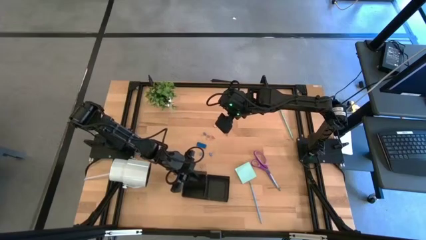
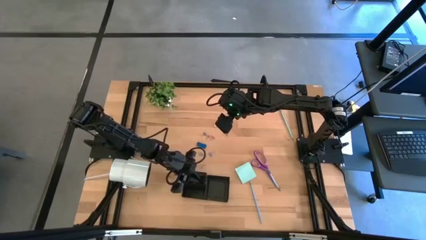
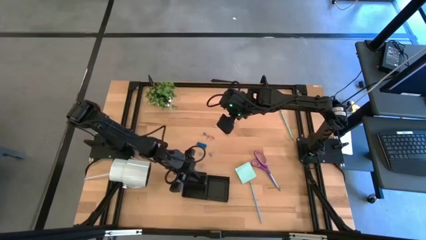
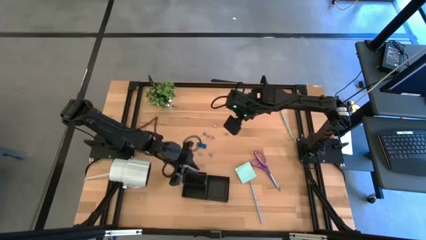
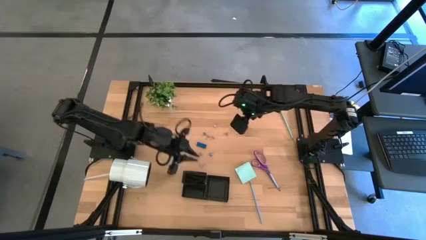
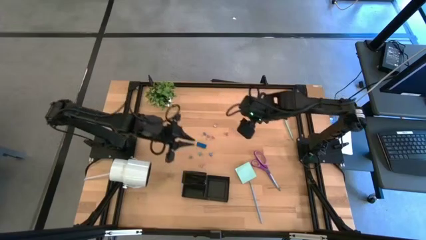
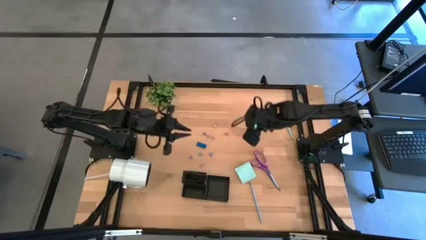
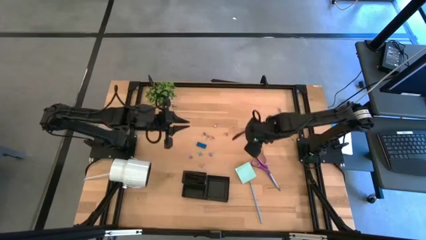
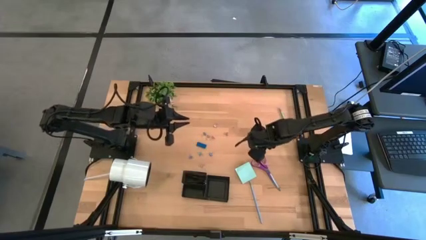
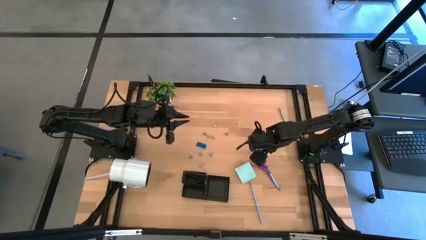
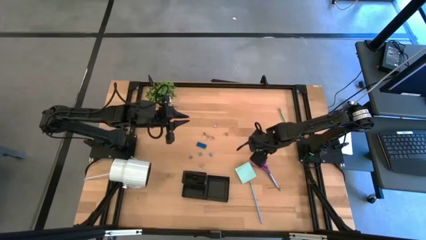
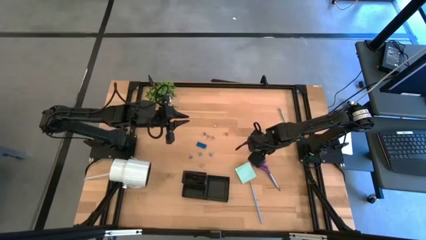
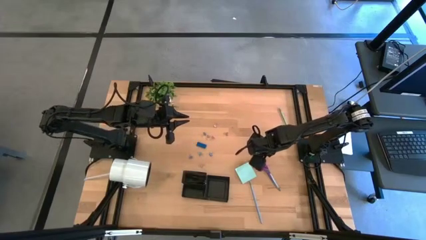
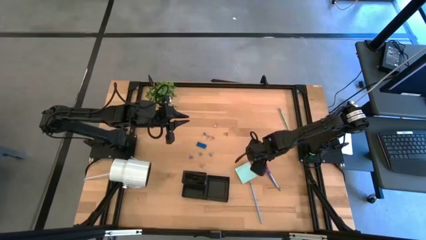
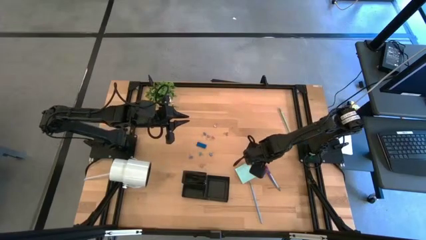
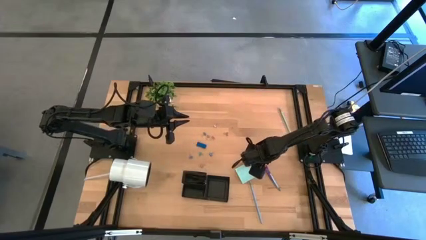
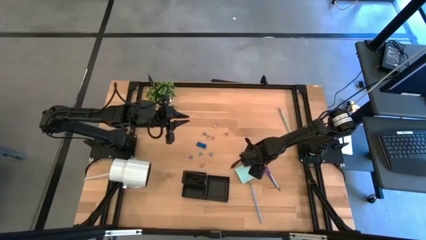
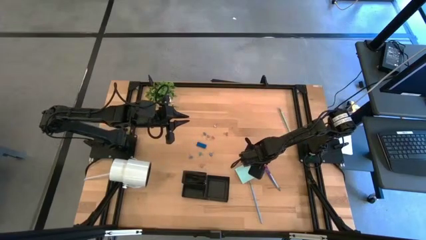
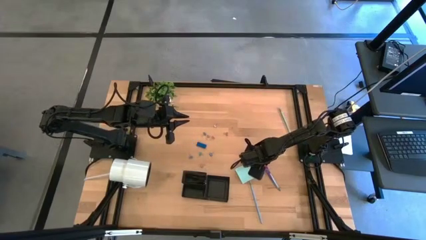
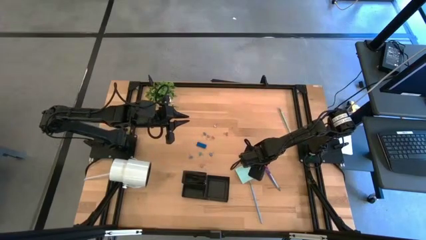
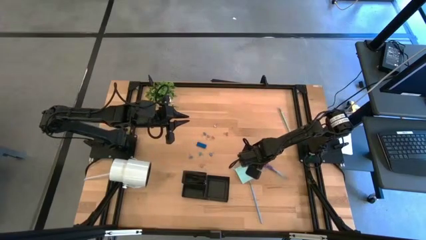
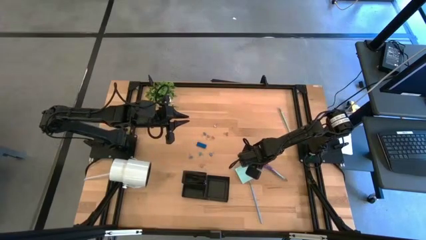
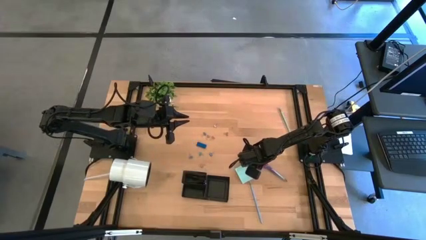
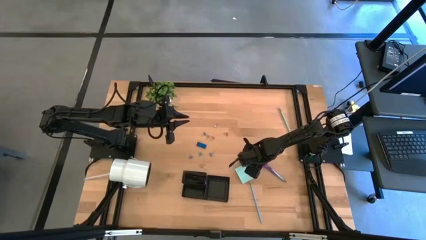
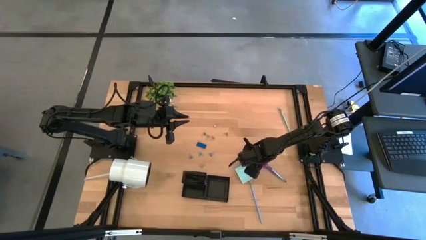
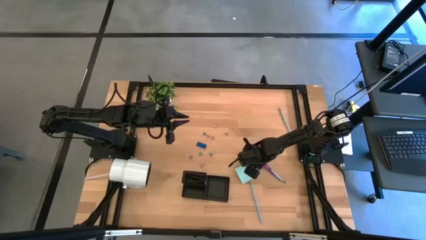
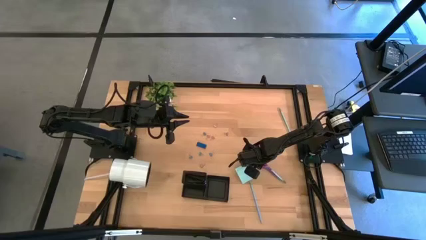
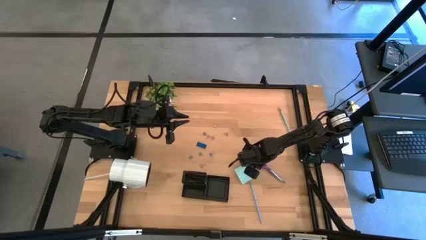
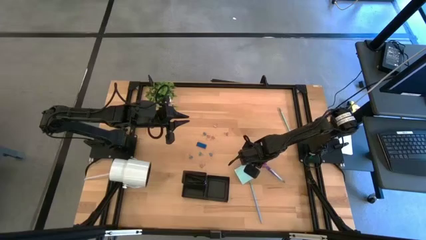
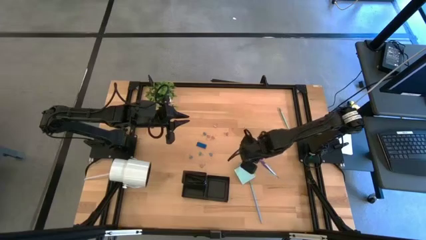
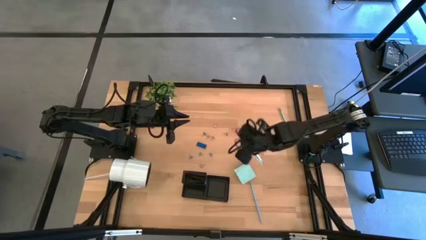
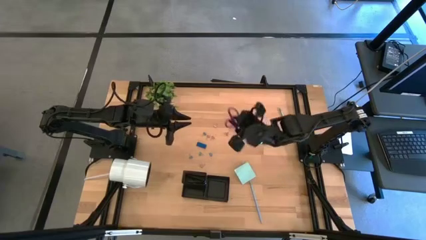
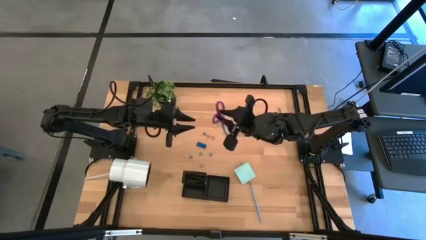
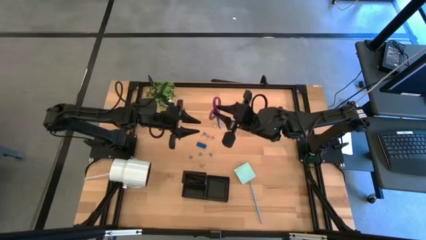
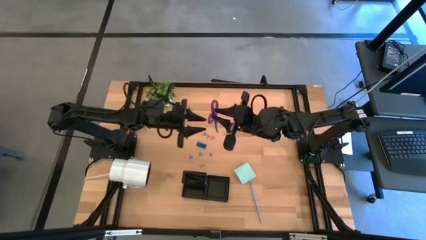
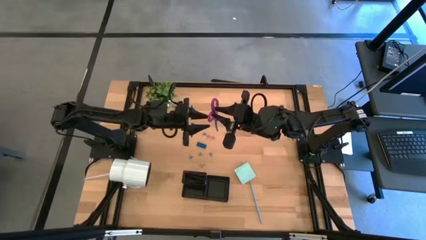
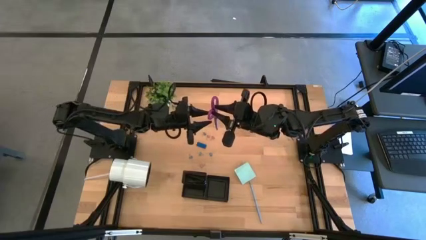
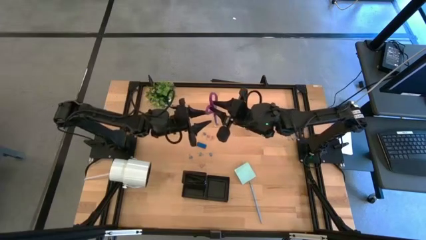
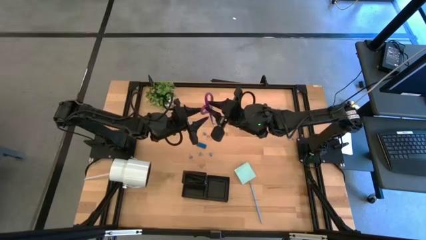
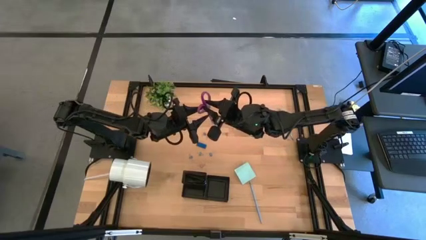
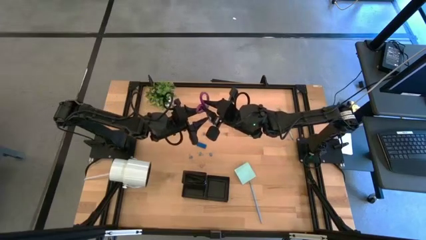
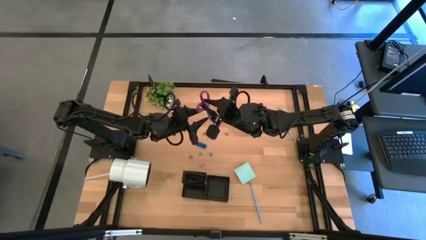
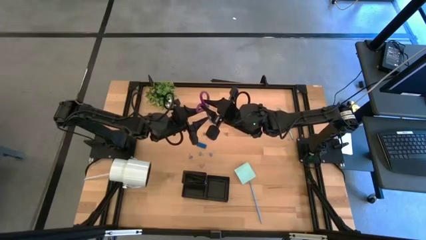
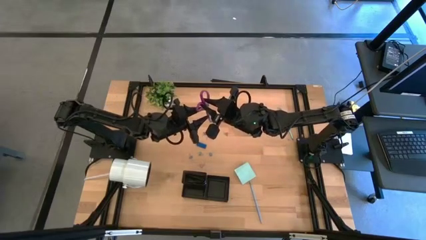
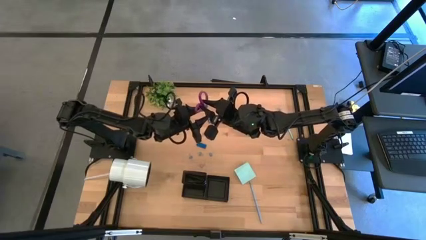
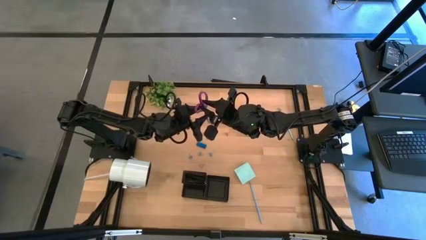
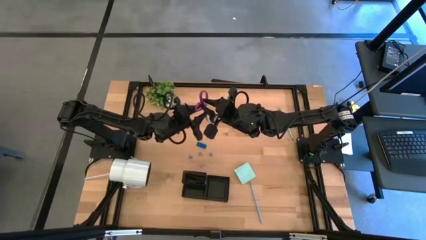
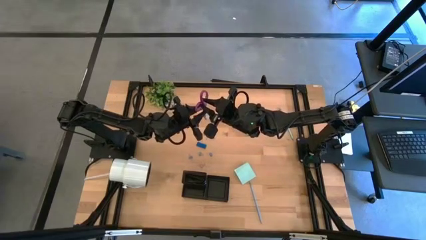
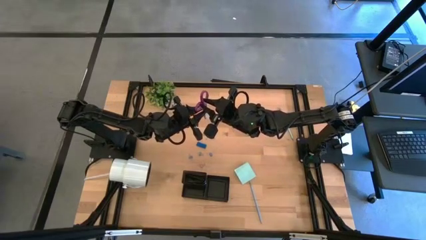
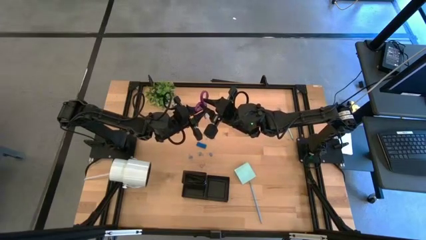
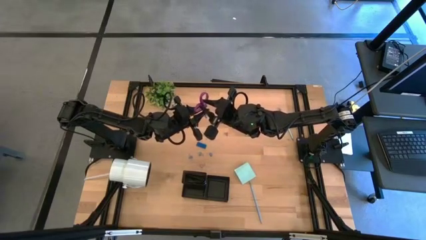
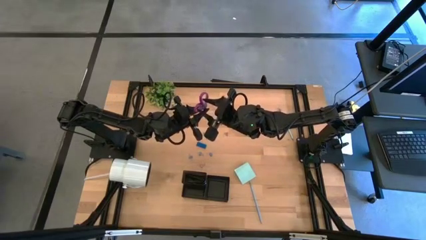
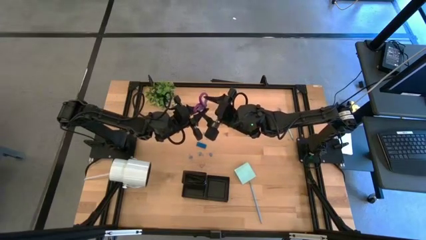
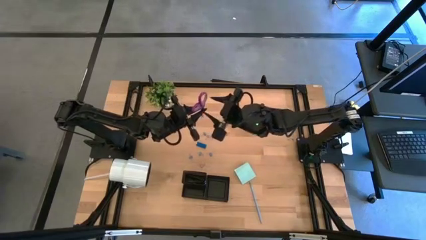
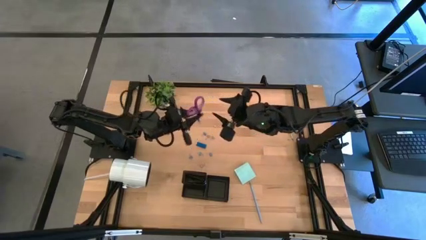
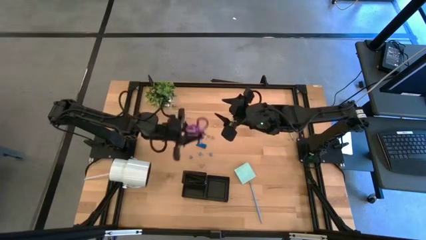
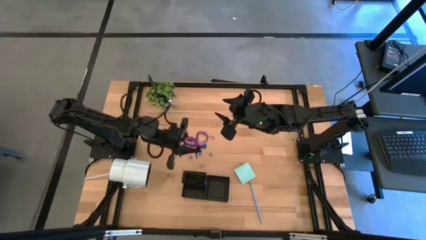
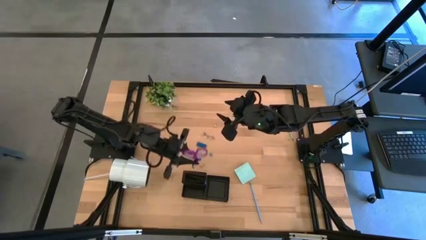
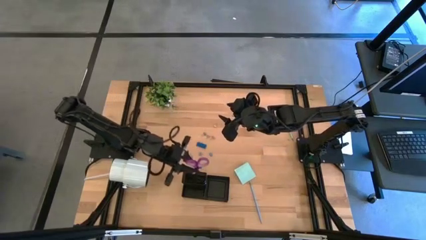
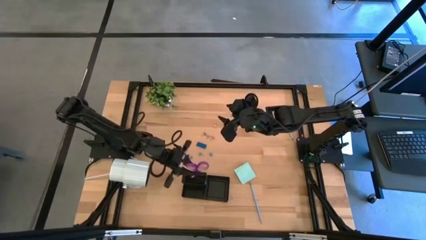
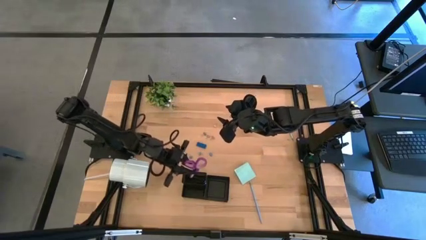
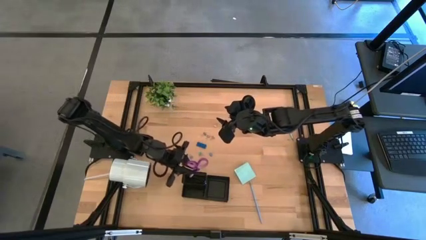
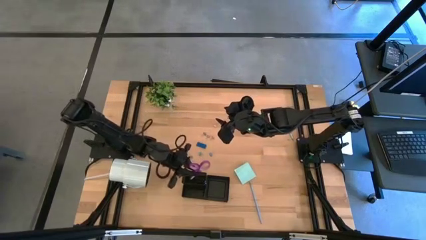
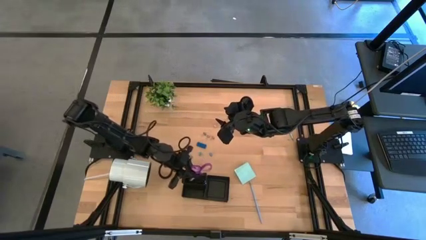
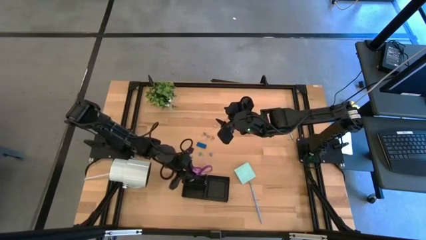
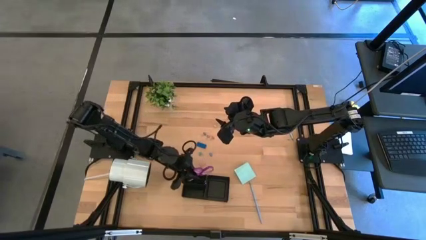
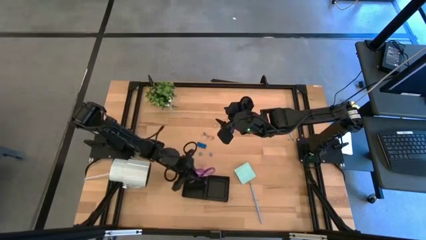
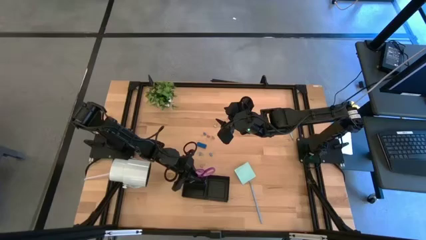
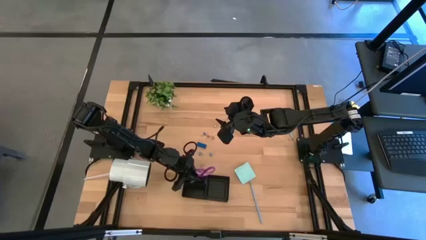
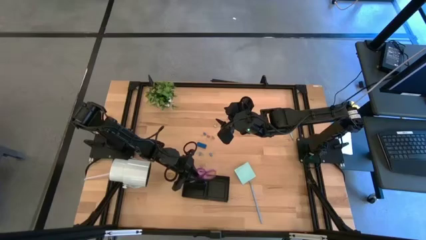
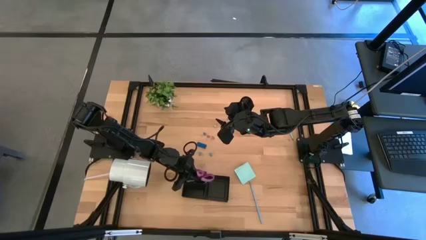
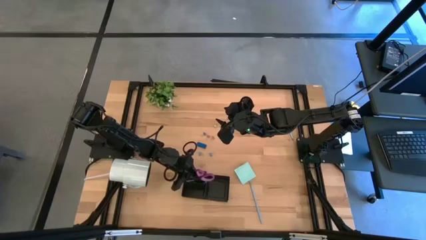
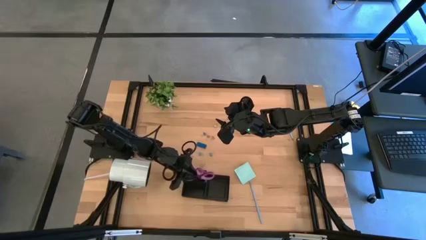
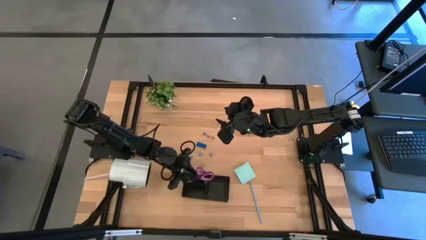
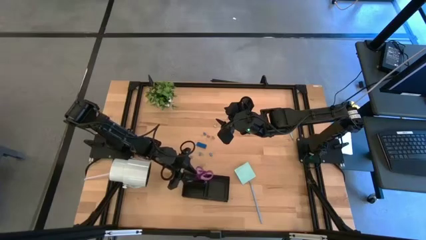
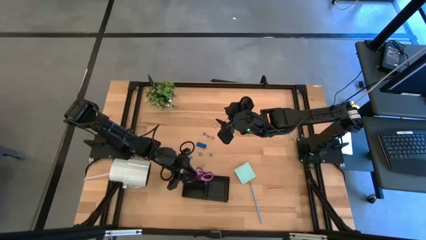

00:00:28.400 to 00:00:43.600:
Task: Pick and place office supplies into organizer
Put the scissors into the desk organizer
